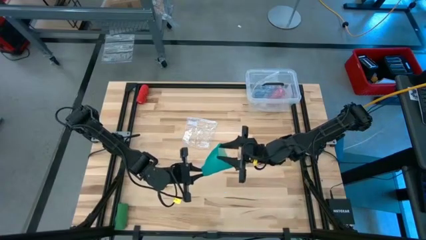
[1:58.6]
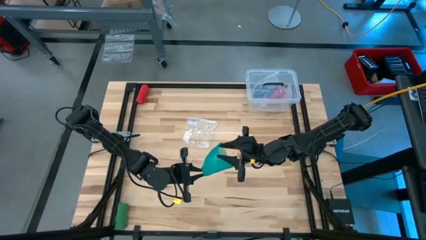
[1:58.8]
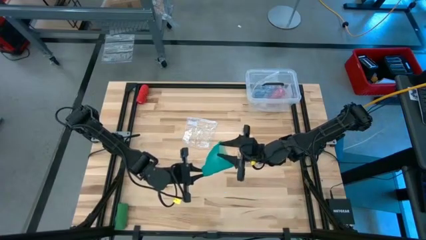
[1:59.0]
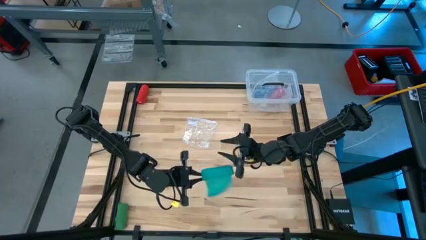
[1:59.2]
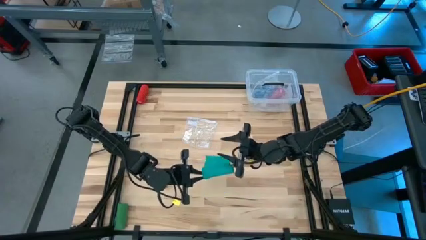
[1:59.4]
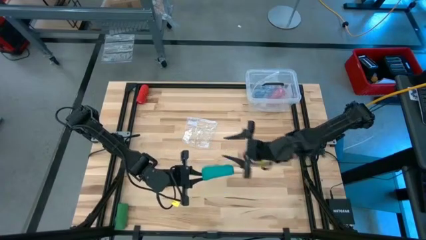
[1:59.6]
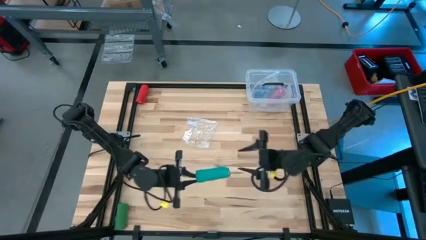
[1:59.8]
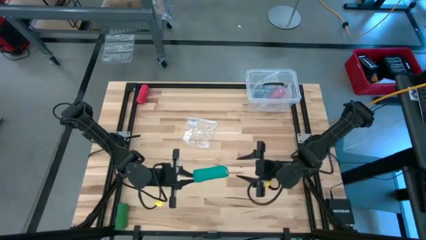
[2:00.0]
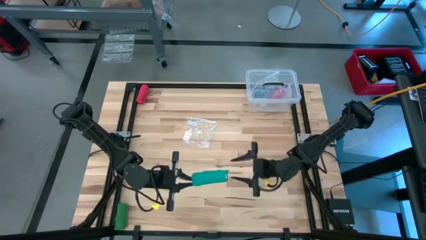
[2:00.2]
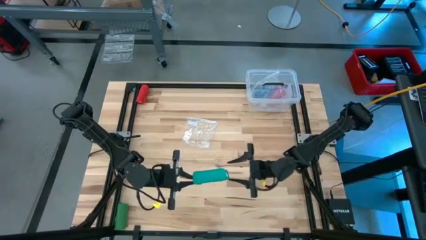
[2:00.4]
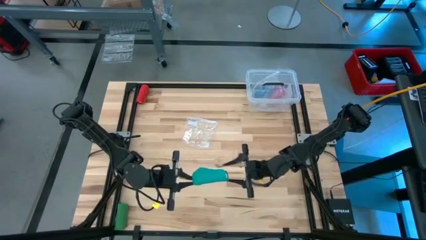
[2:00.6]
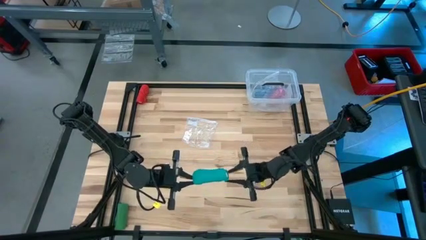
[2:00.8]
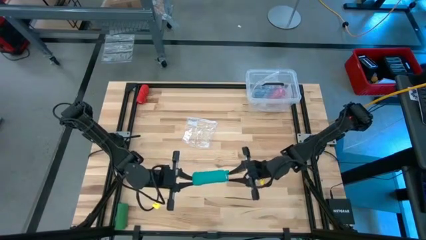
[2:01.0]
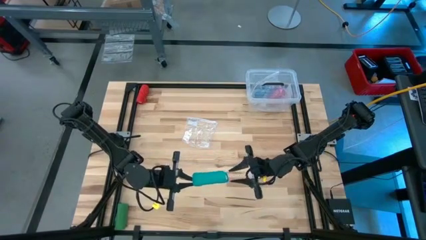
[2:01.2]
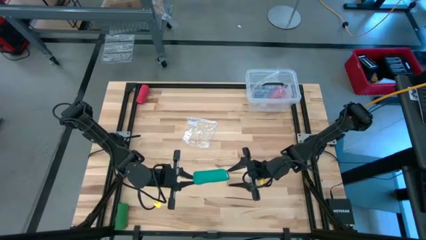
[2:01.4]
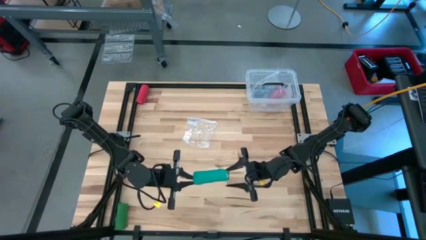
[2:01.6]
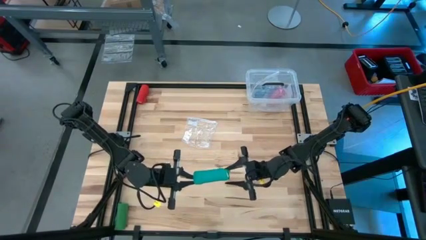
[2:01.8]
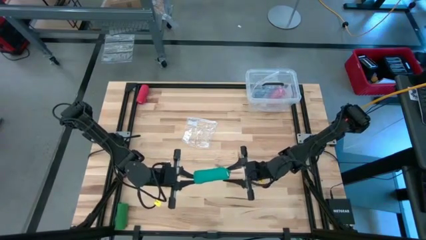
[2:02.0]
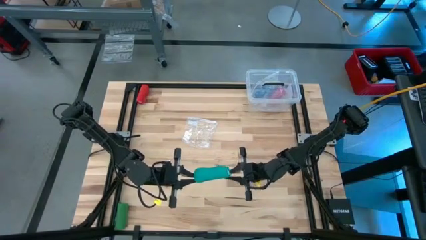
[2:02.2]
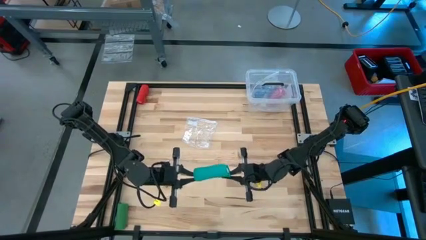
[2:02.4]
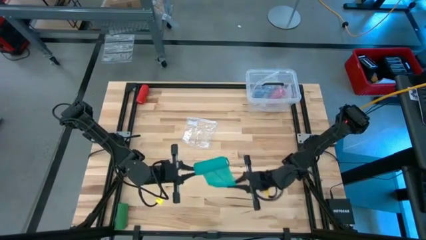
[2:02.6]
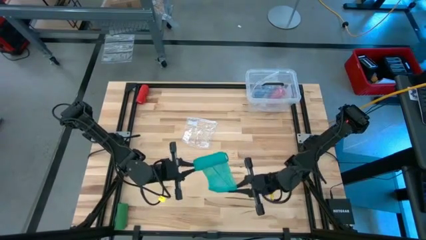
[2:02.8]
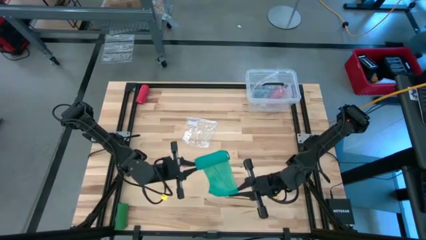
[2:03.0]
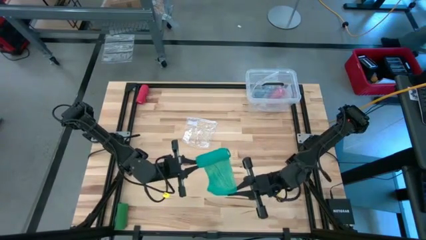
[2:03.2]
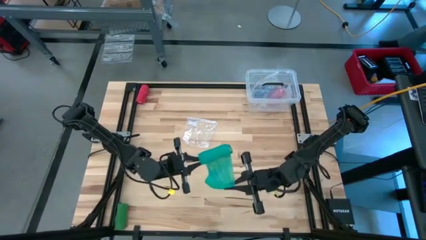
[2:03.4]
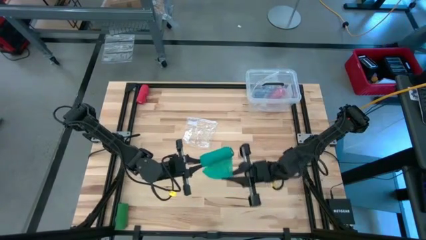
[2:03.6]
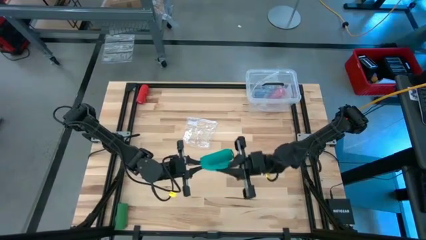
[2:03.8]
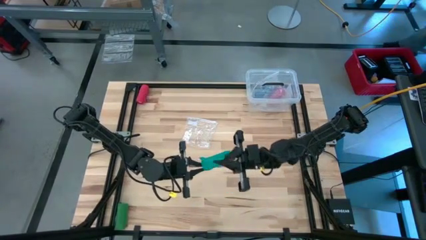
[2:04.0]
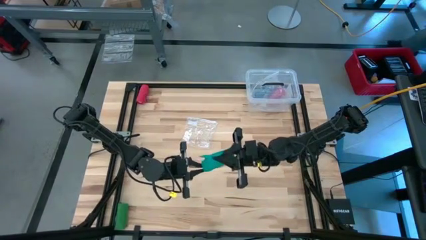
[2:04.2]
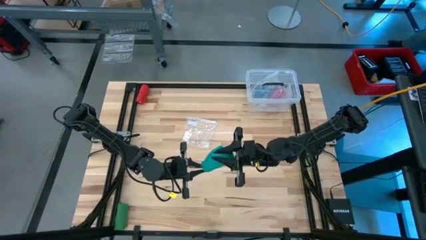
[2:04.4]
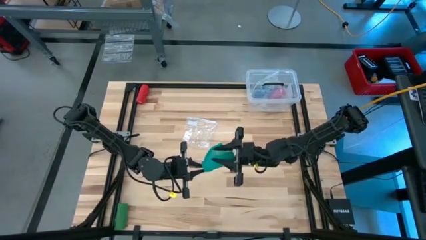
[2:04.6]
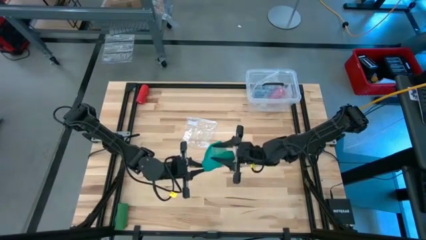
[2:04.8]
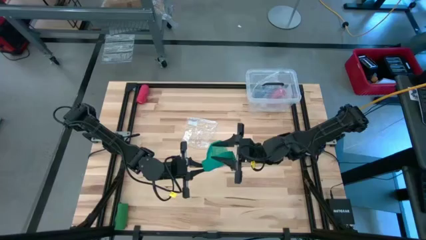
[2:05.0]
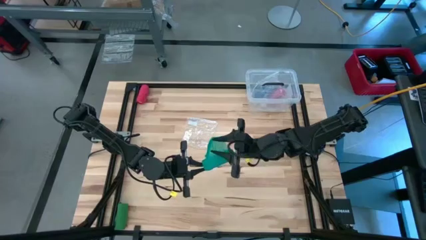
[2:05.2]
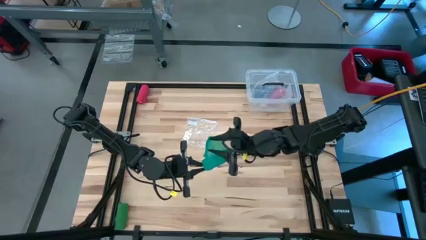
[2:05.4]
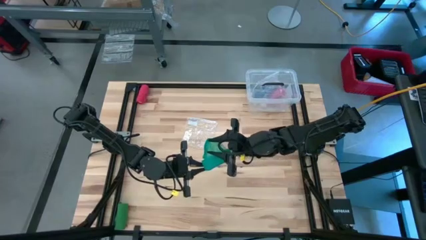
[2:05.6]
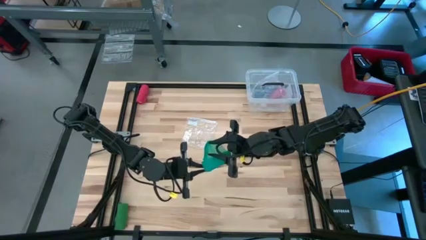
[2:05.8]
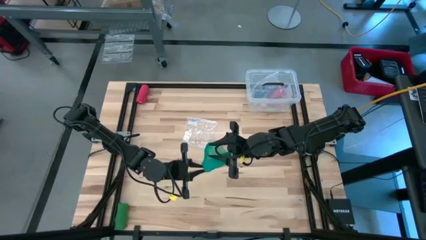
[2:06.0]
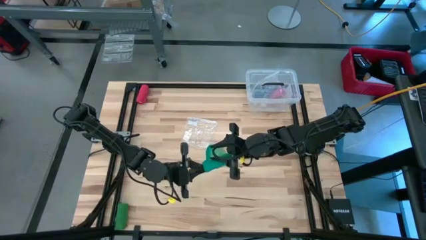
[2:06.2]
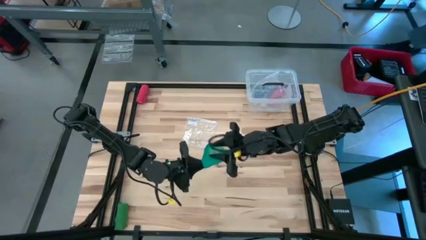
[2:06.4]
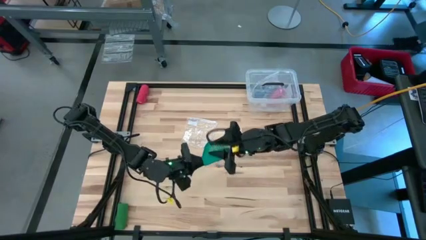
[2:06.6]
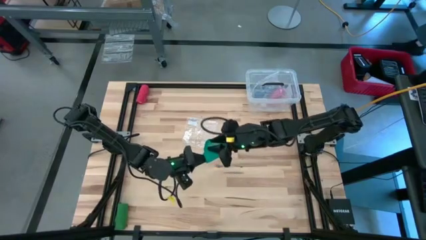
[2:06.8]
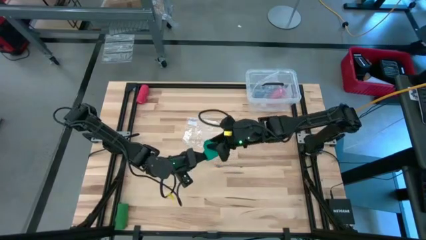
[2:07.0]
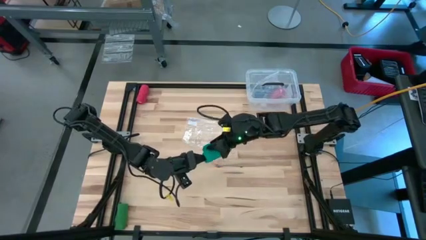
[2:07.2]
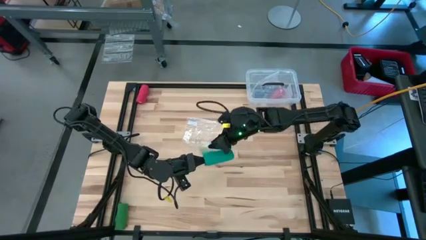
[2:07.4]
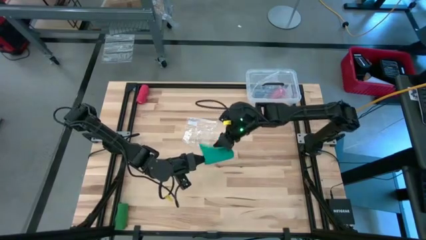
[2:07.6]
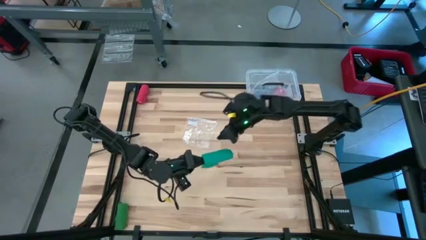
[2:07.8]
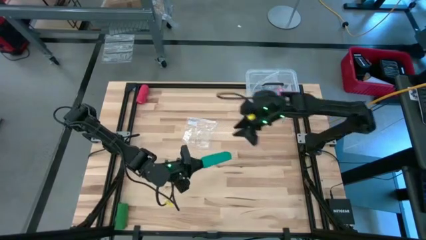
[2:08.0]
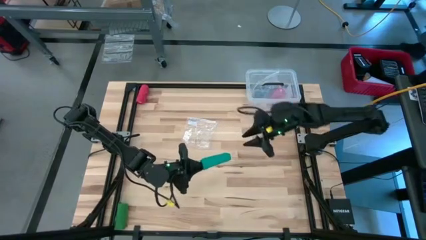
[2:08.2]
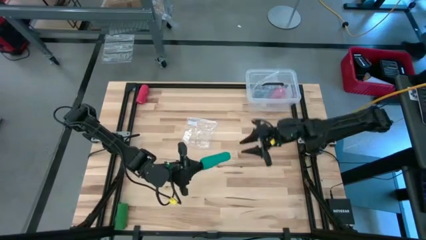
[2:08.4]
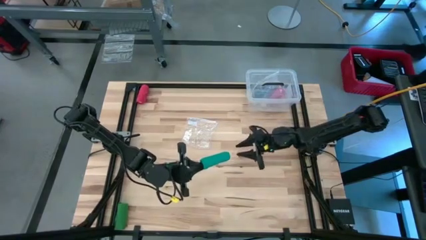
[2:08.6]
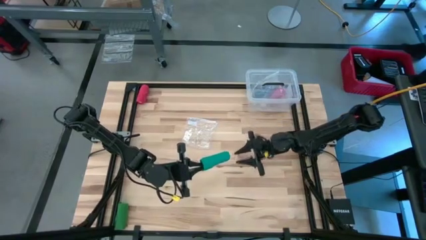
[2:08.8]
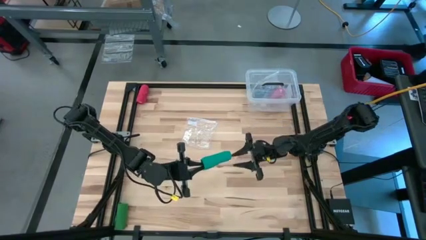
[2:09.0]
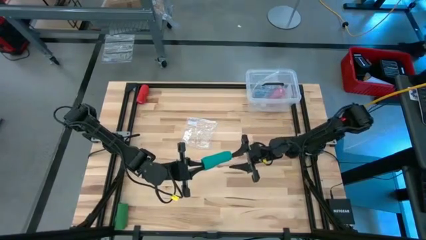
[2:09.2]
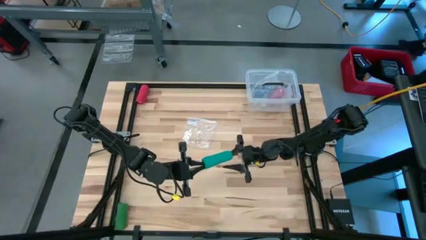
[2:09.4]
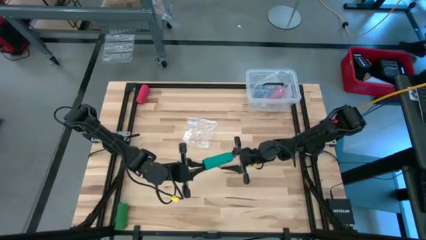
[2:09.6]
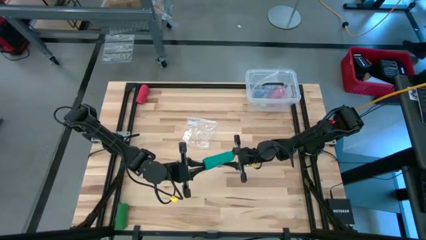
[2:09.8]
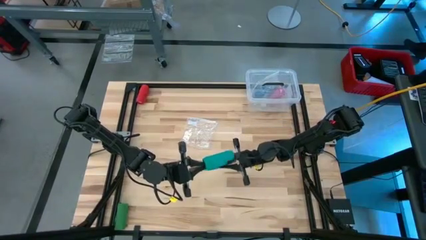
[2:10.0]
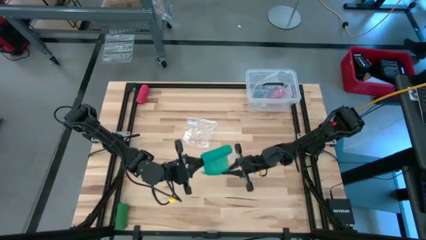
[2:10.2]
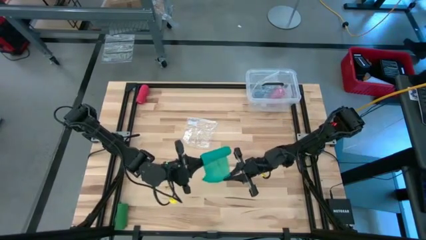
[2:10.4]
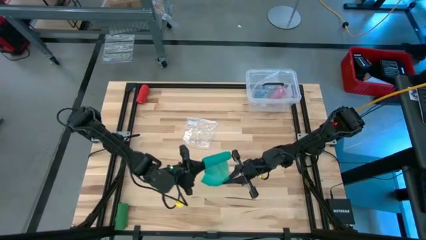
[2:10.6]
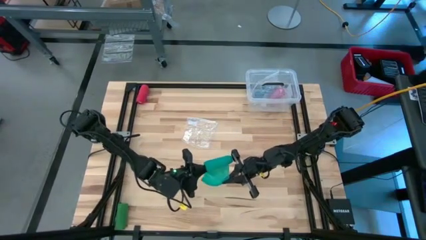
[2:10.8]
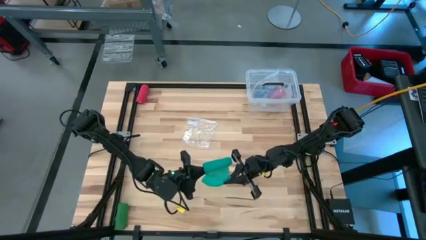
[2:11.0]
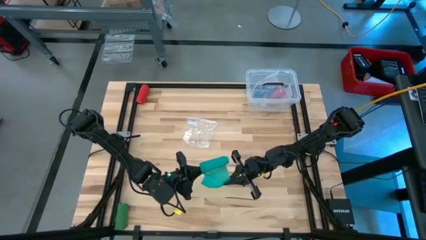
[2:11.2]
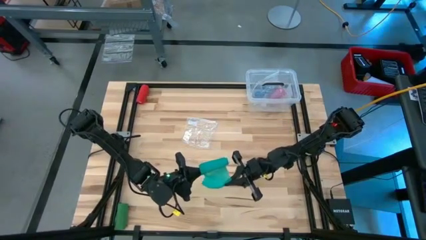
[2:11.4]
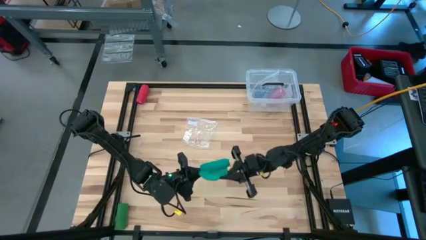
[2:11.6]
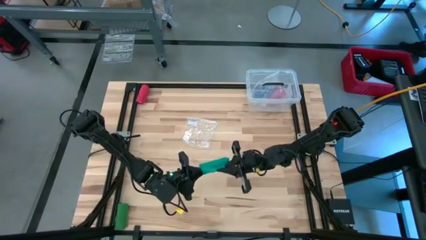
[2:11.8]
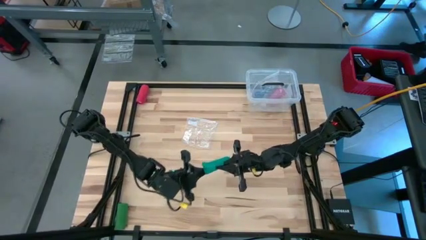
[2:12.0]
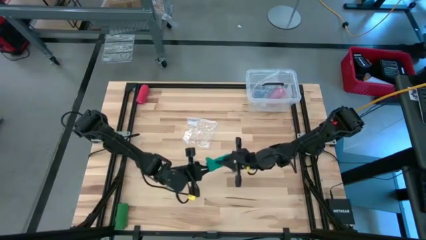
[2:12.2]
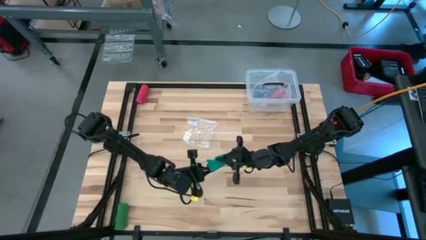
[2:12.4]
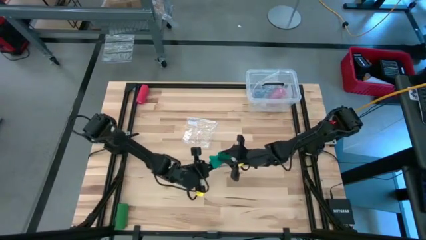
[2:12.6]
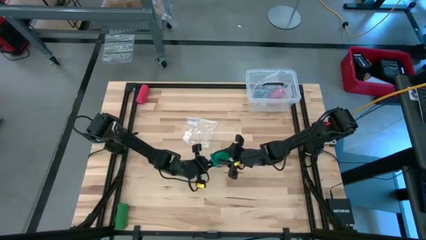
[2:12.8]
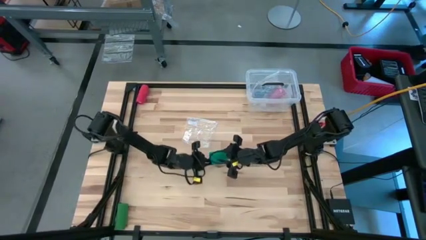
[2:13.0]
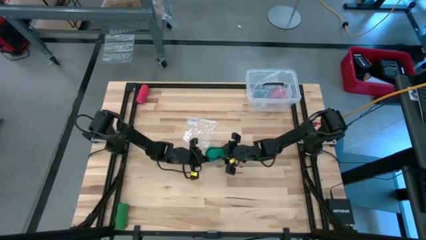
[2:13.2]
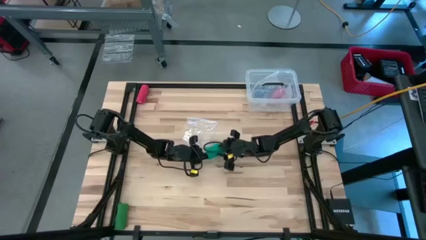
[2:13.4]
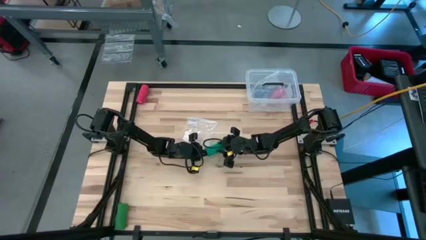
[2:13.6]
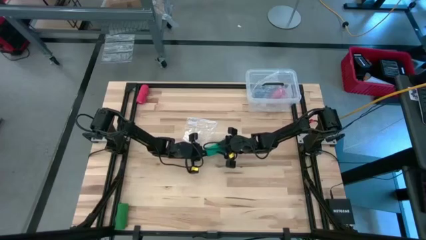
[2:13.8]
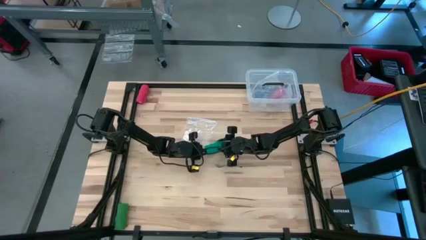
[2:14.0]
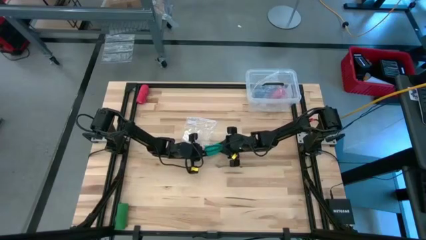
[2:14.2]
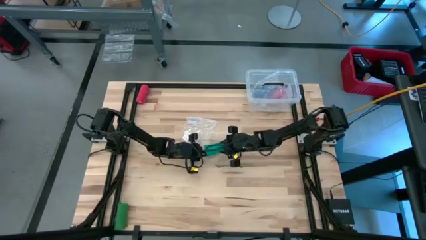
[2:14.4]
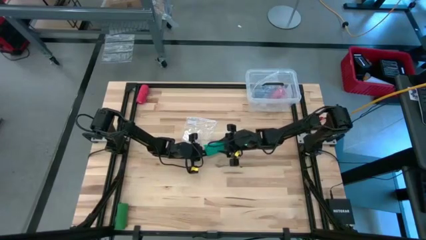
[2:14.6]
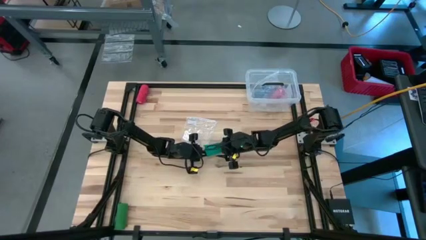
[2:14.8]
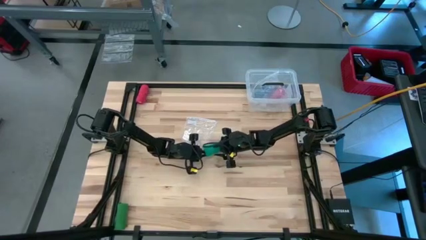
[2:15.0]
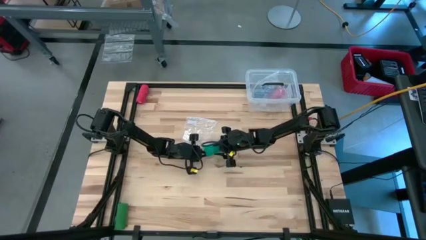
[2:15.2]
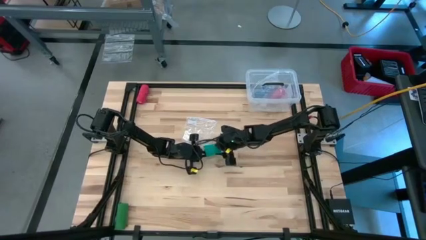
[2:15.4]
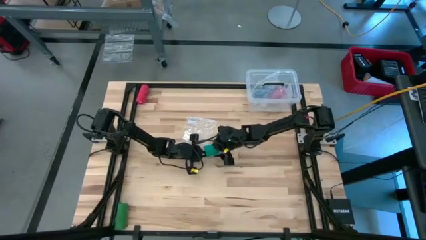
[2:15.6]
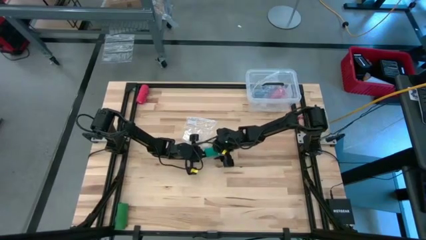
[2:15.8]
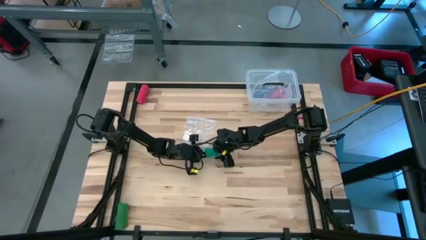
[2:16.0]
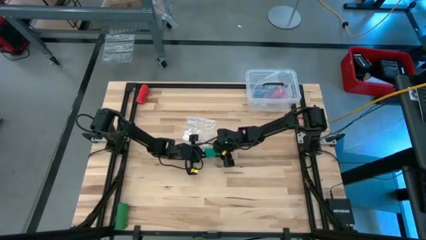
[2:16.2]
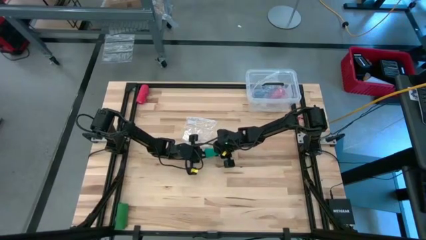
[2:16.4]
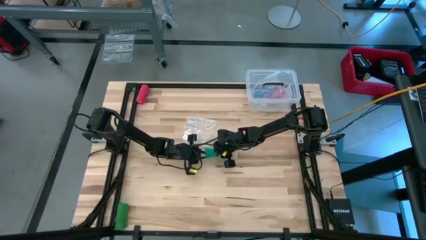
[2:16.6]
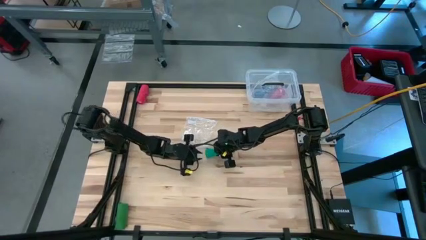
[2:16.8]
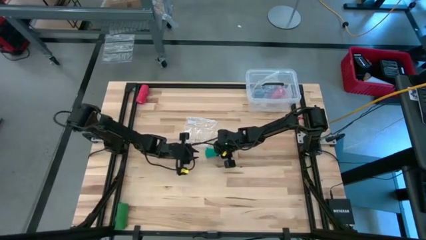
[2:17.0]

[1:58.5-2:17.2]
Task: Roll bandage
Roll the green bandage
